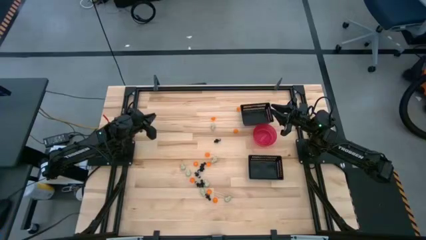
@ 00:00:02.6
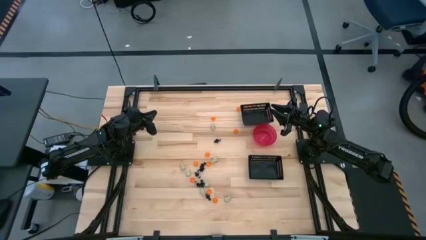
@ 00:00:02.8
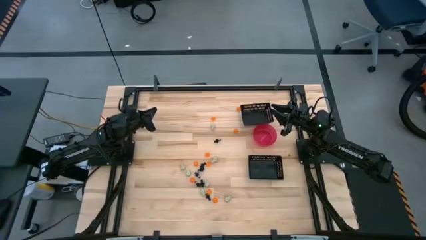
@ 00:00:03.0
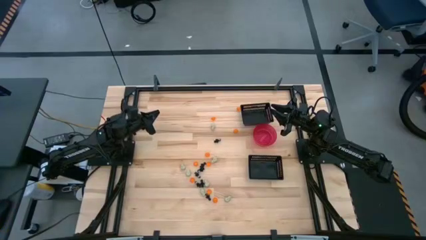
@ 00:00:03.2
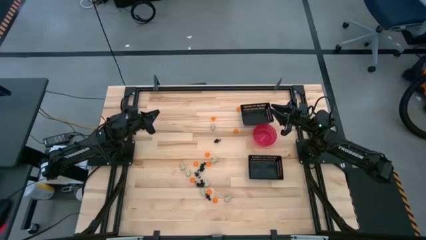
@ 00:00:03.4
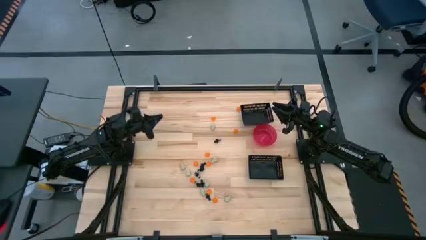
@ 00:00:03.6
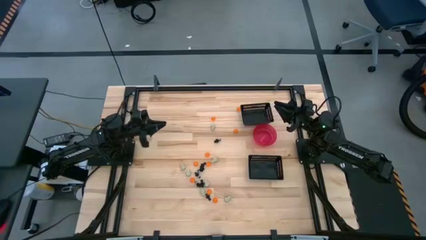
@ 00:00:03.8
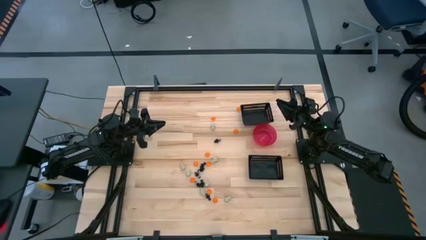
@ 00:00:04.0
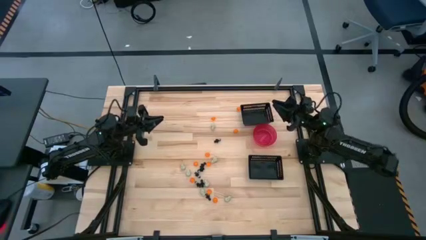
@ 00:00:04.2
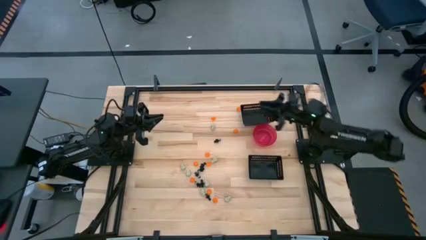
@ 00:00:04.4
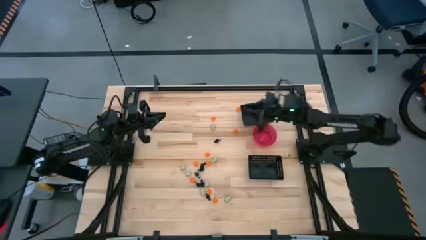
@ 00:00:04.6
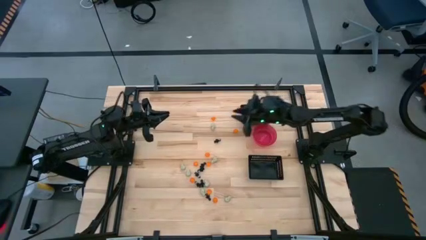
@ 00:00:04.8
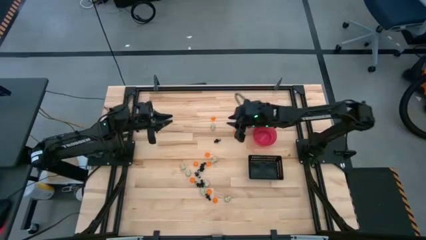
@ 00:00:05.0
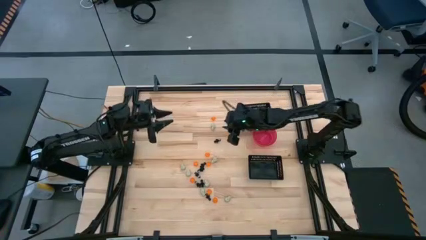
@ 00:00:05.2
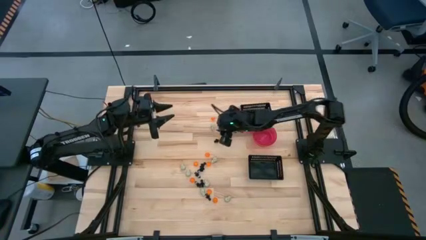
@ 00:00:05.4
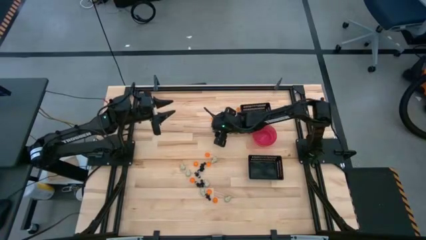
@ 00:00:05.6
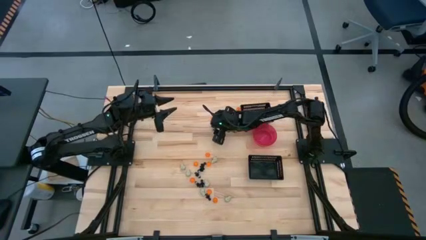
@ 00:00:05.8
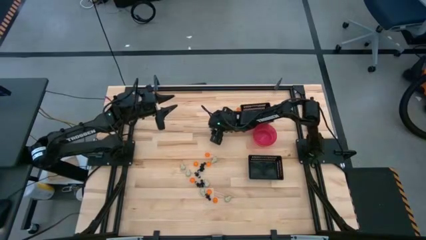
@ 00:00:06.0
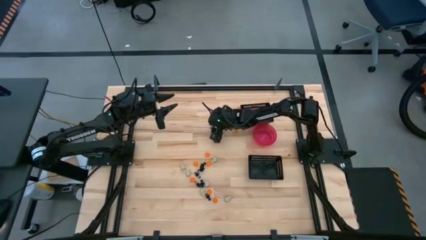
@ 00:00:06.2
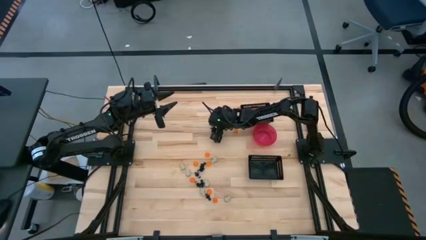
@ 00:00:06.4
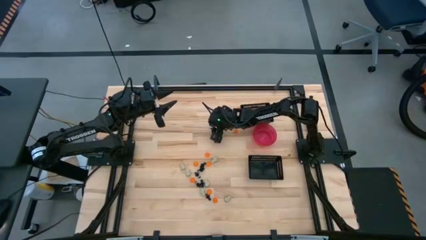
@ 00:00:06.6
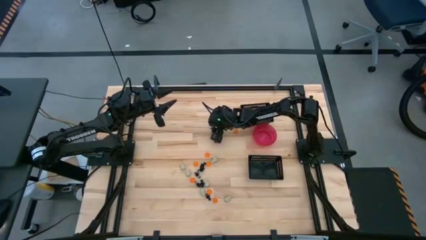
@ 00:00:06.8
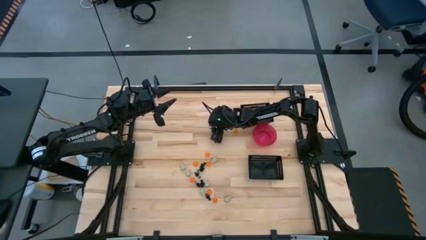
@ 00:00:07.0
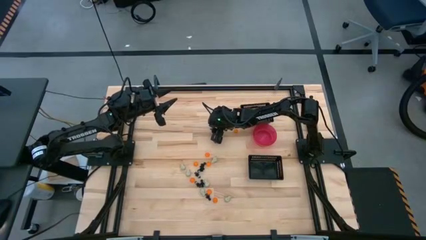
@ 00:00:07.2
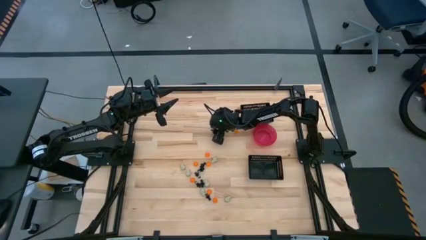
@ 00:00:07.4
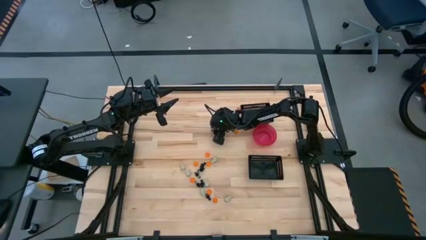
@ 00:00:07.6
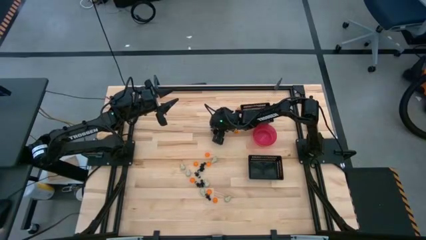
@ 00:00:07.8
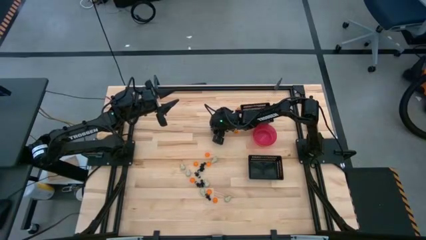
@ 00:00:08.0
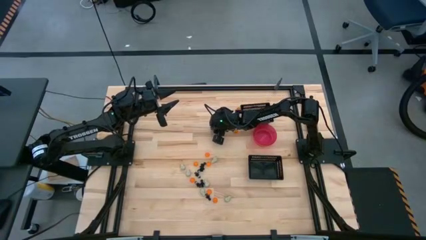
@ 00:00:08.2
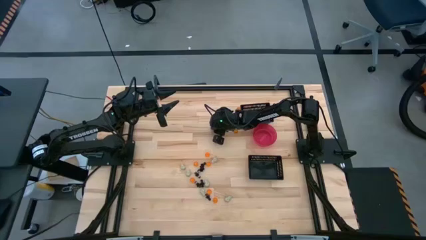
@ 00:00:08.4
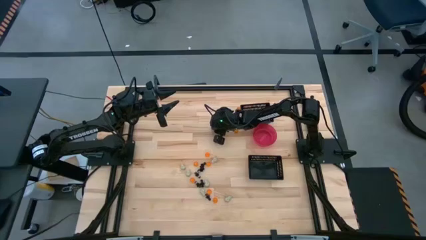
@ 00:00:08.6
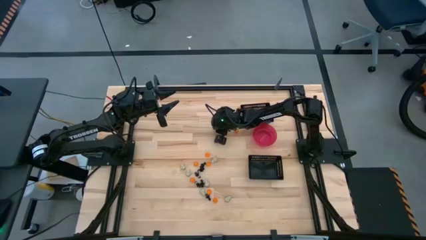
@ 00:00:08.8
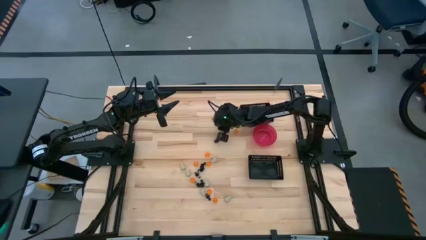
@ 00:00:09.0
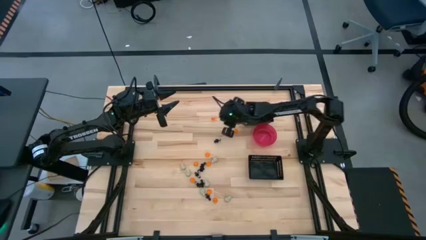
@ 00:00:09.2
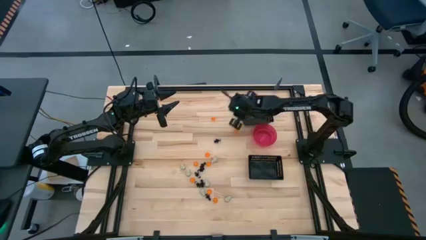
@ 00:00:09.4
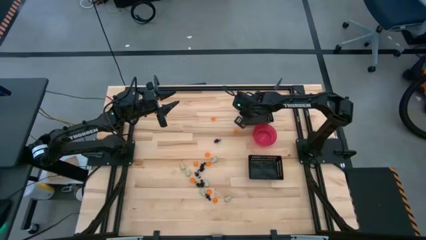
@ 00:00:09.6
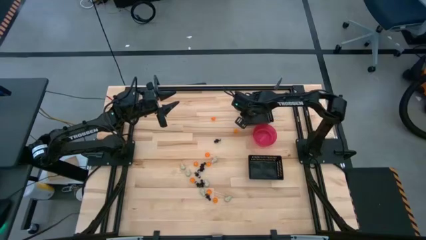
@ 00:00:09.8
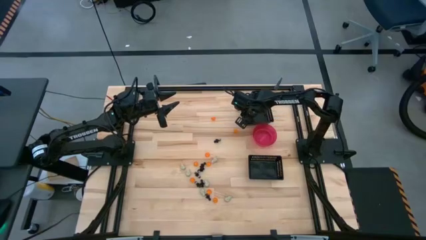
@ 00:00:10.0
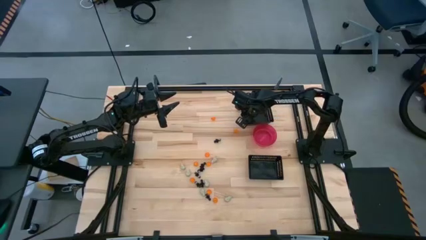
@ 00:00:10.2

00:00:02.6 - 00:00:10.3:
Task: Sort Halloween decoration
Put the white skull toy into the top black bin

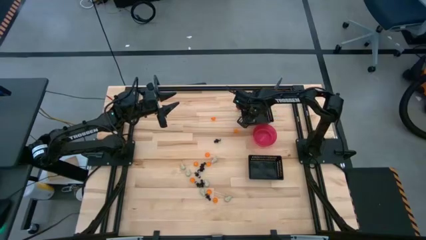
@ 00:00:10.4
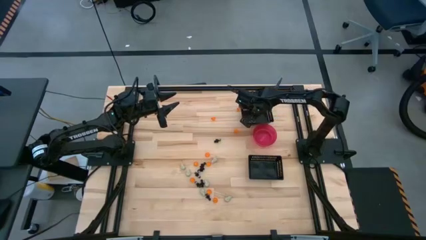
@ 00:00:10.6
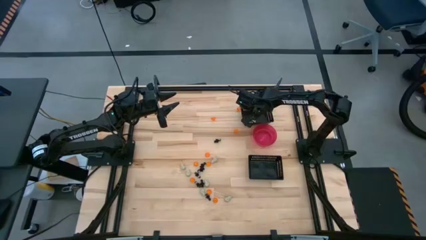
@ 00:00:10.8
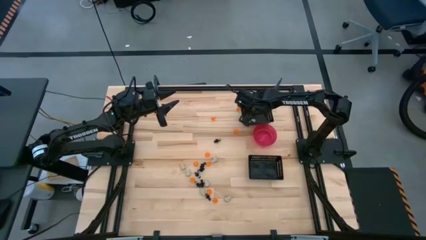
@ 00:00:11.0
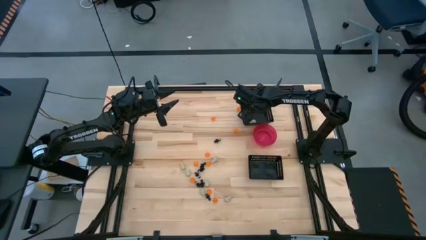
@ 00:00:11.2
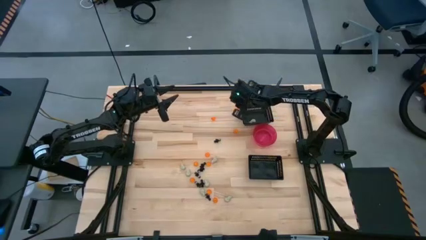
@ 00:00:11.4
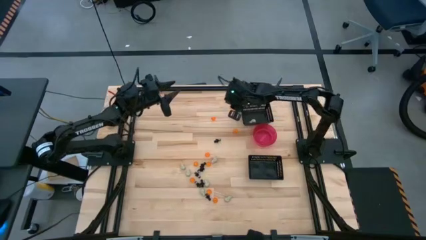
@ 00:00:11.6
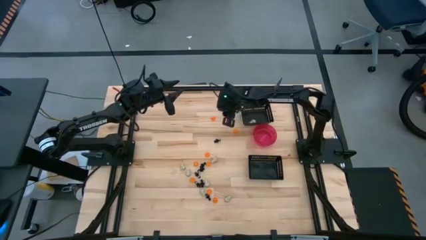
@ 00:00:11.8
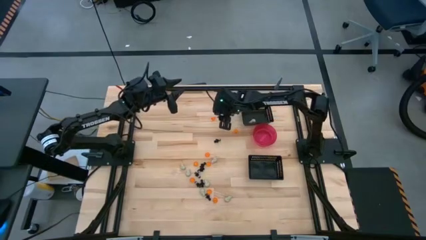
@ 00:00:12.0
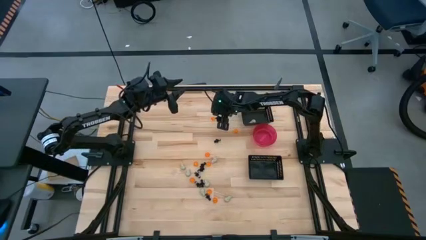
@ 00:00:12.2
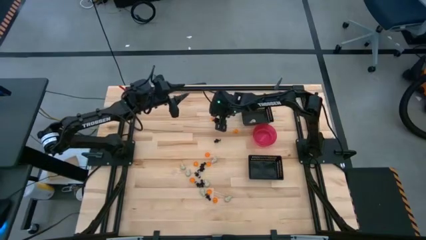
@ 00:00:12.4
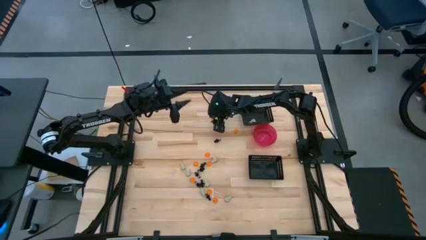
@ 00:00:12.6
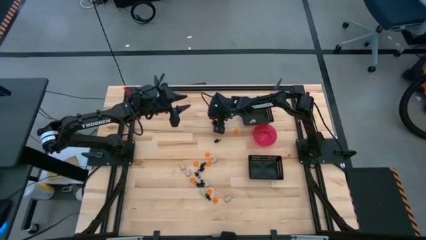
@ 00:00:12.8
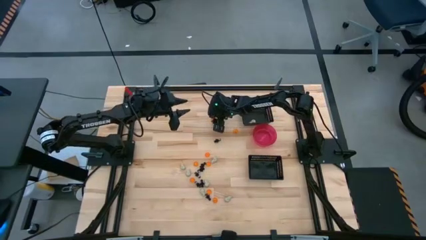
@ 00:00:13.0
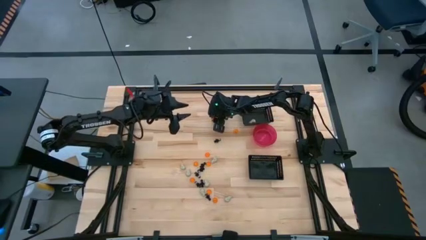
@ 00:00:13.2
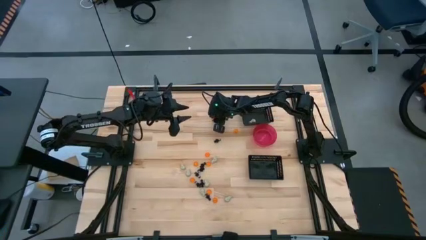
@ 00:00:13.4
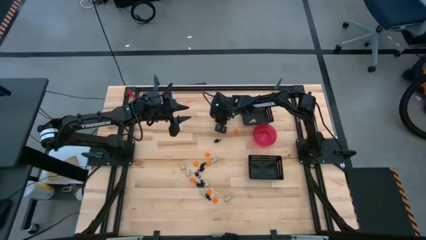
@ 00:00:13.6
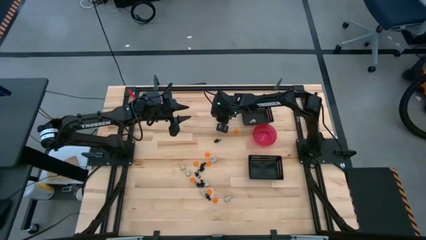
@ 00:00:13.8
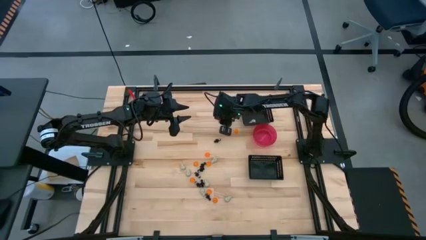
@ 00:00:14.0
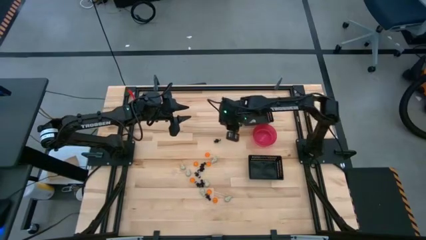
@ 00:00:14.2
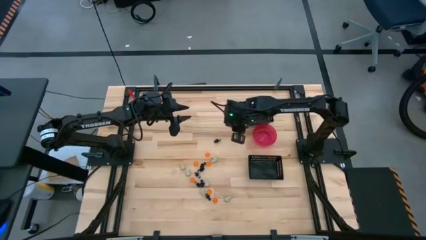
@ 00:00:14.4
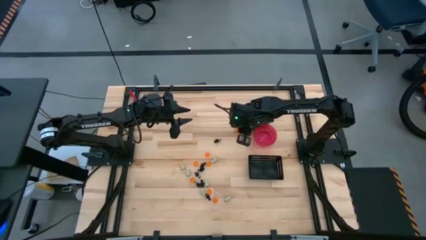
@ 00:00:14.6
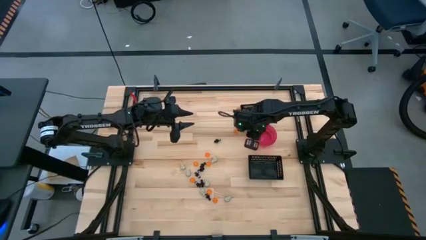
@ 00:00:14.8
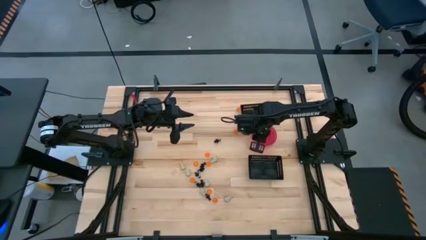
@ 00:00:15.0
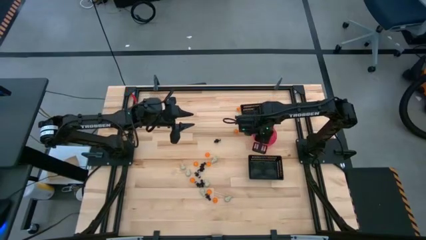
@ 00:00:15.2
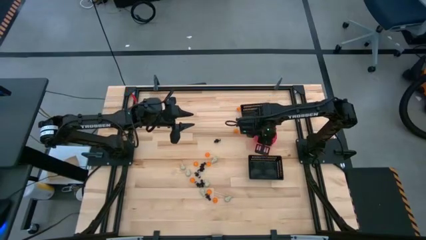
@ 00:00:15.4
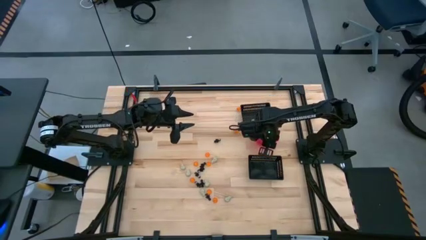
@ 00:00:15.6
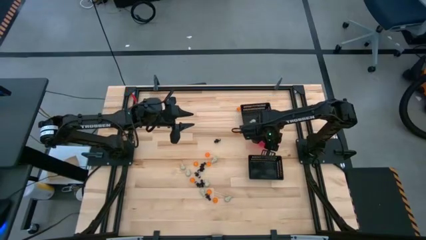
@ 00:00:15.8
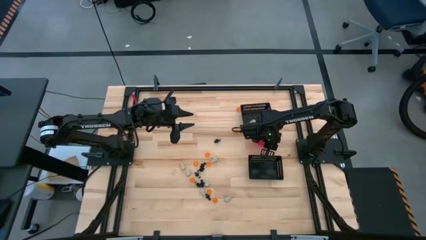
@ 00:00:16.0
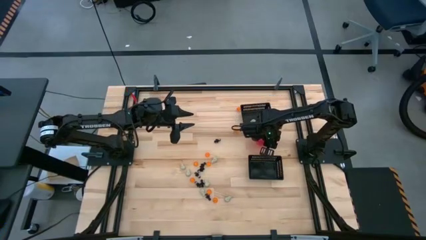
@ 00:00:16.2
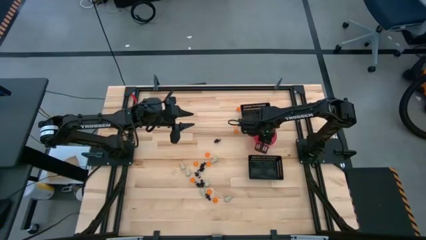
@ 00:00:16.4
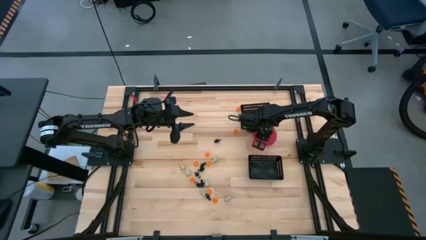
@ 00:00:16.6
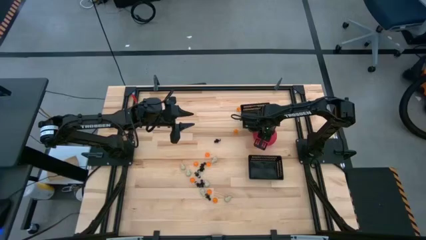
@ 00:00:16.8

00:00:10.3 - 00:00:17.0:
Put the orange pumpkin toy into the pink bowl

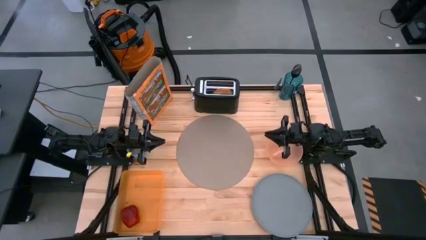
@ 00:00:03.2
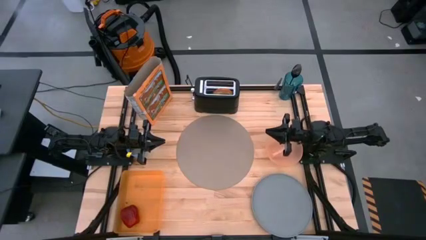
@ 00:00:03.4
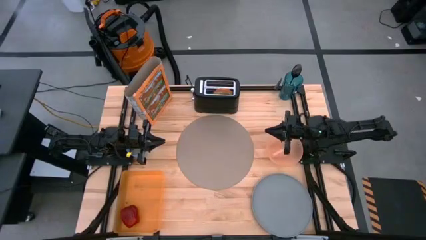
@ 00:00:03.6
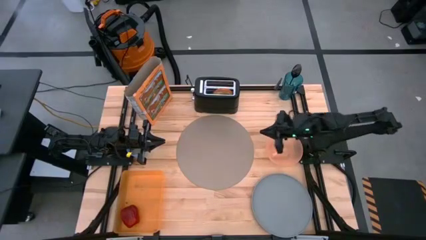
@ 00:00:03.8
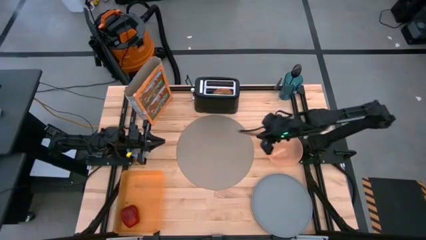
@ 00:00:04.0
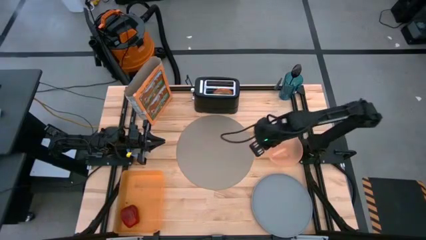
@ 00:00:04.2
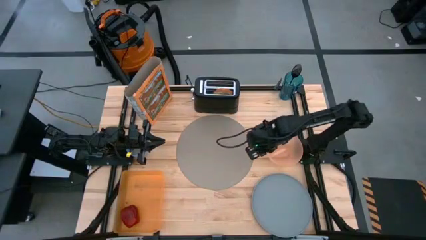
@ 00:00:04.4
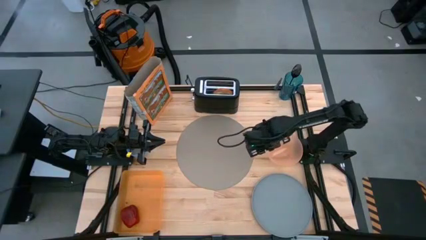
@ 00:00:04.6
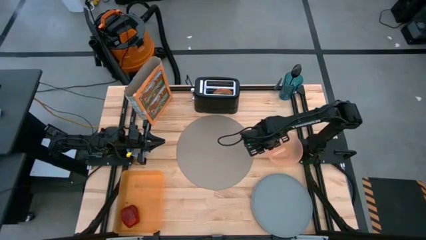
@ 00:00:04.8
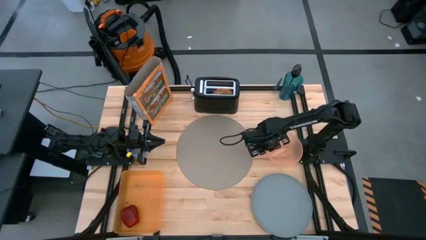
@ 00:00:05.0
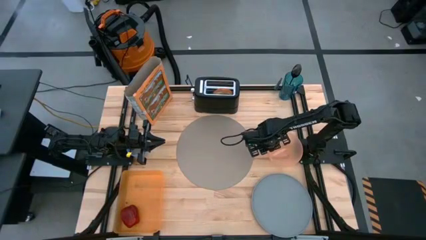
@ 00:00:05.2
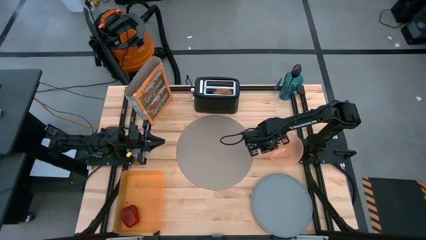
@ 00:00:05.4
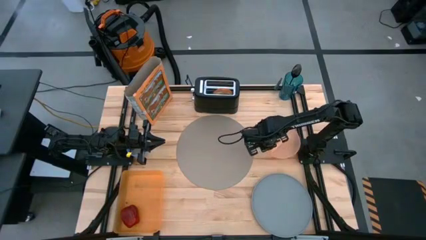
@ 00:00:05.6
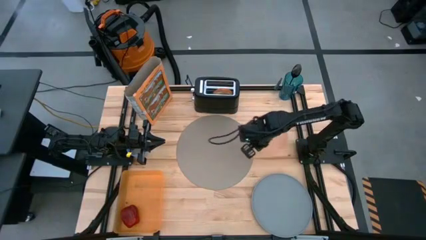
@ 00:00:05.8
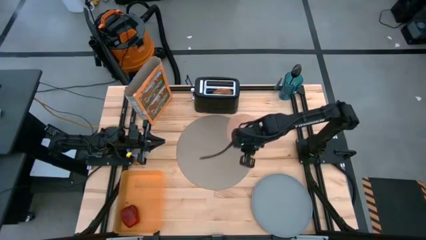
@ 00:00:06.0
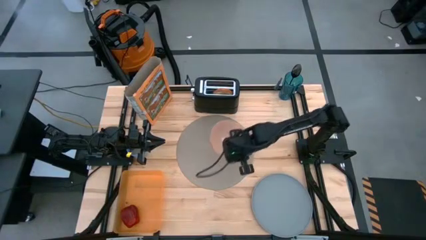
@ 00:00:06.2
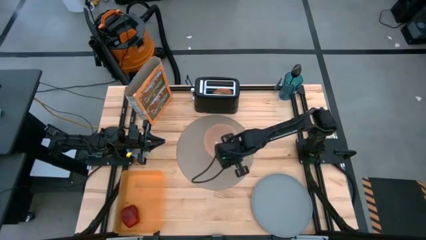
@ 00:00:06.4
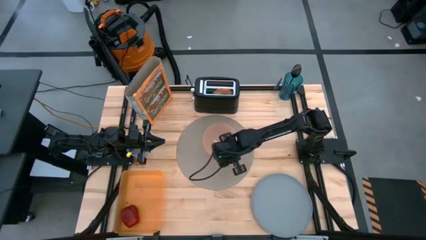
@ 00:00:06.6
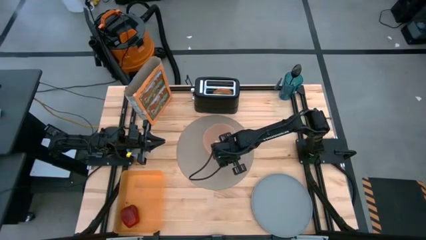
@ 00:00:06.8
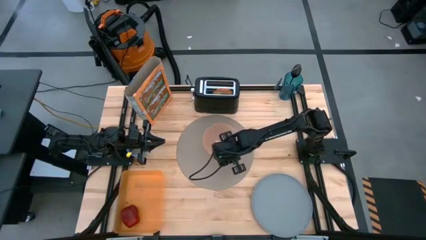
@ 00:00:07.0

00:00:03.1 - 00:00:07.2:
Task: Arrange a breakfast setting
Put the orange bowl on the gray tablemat
